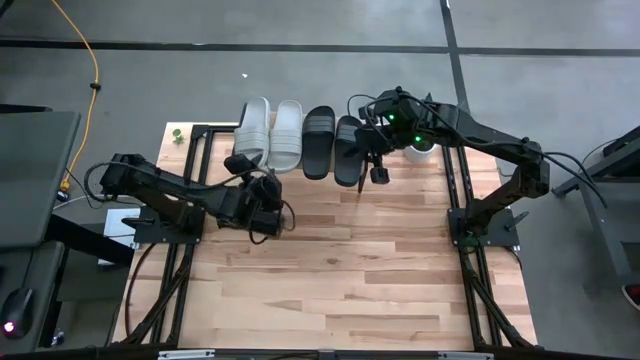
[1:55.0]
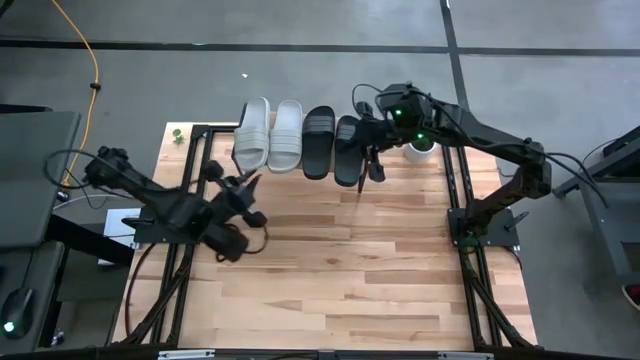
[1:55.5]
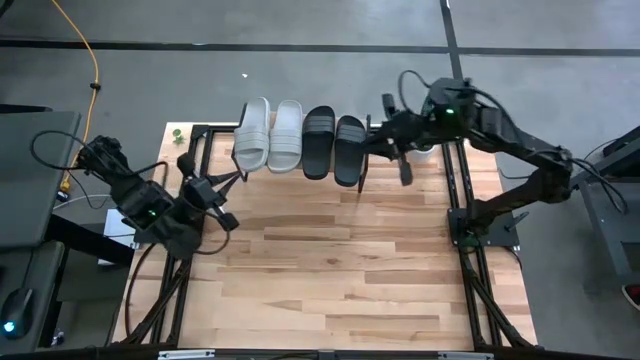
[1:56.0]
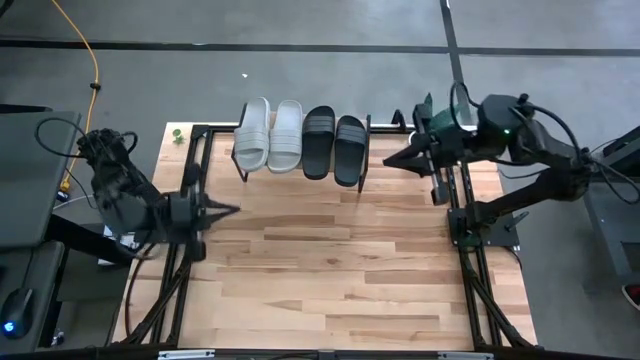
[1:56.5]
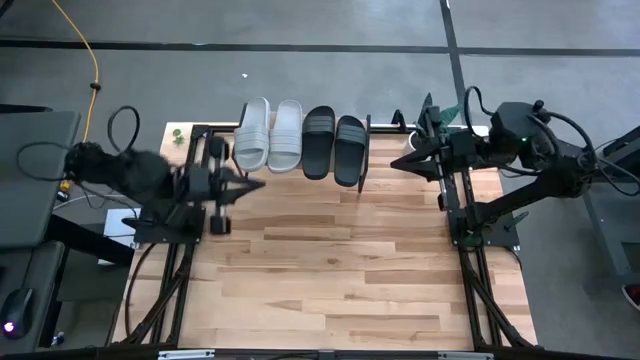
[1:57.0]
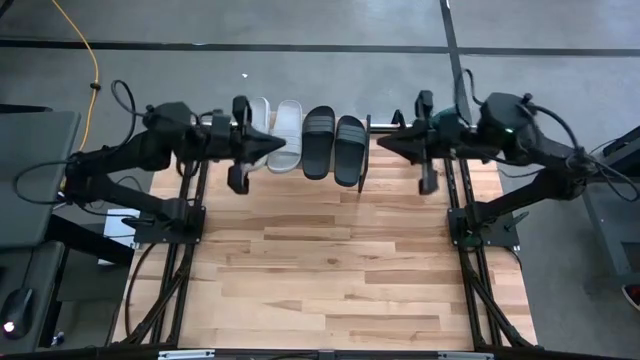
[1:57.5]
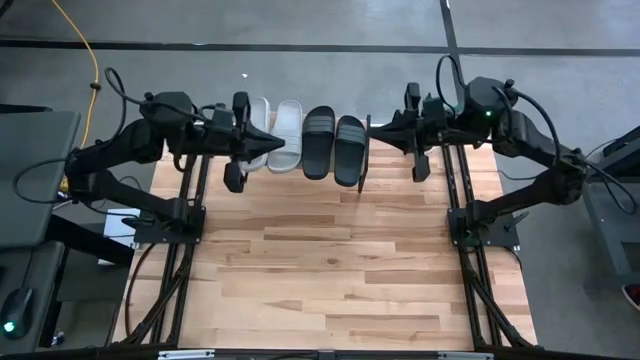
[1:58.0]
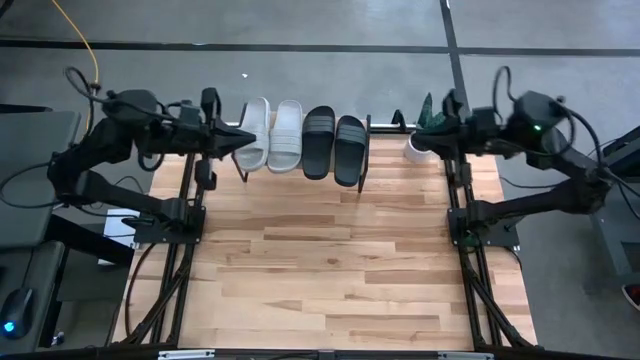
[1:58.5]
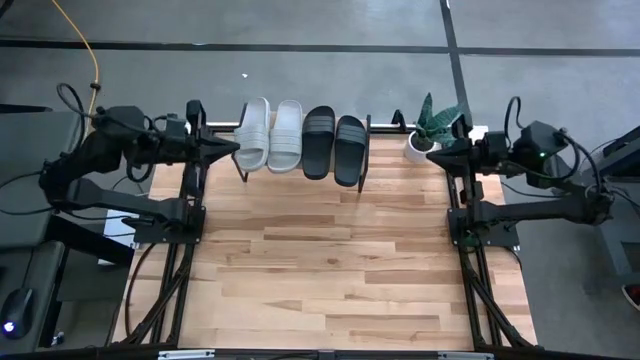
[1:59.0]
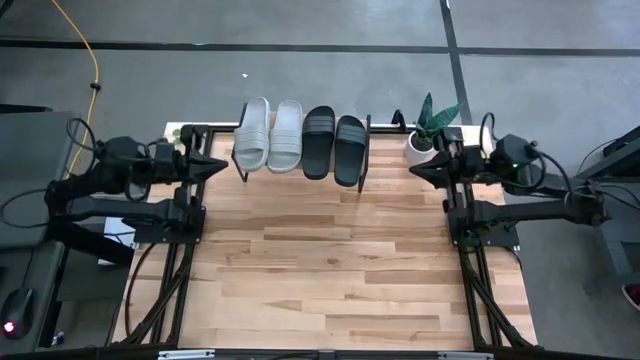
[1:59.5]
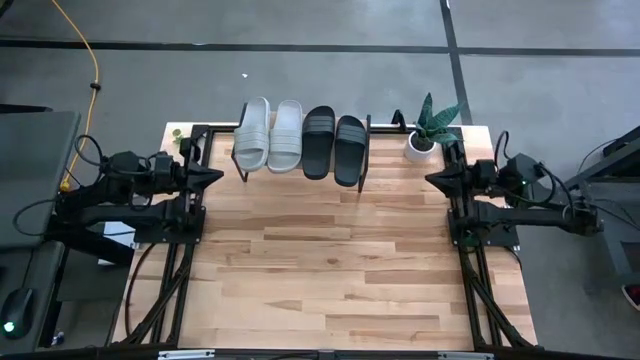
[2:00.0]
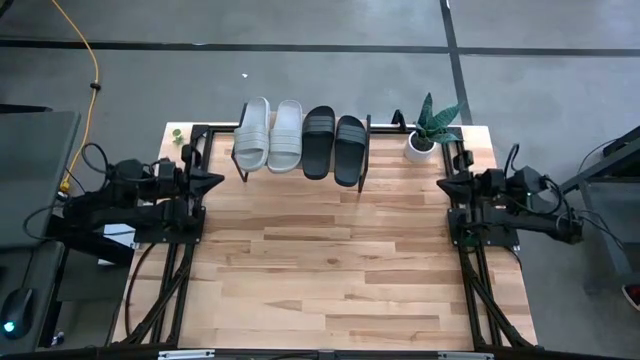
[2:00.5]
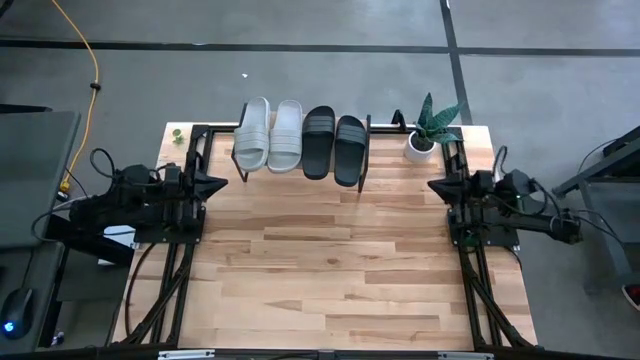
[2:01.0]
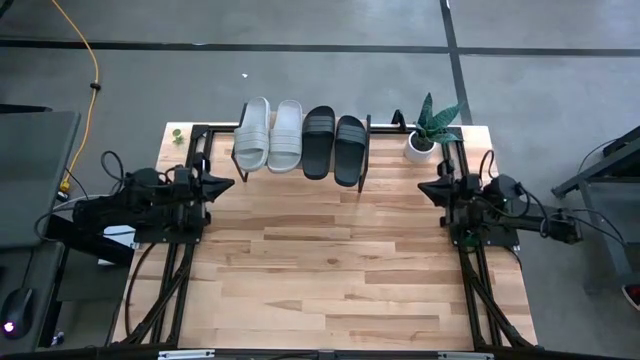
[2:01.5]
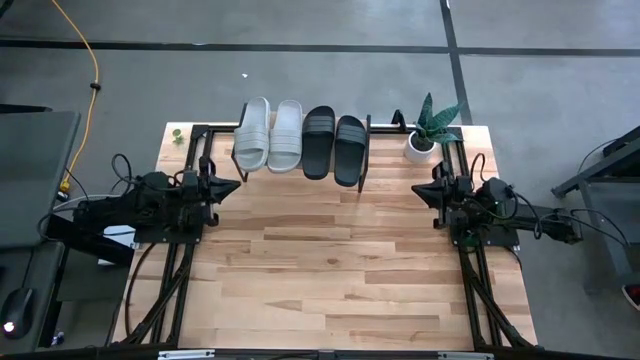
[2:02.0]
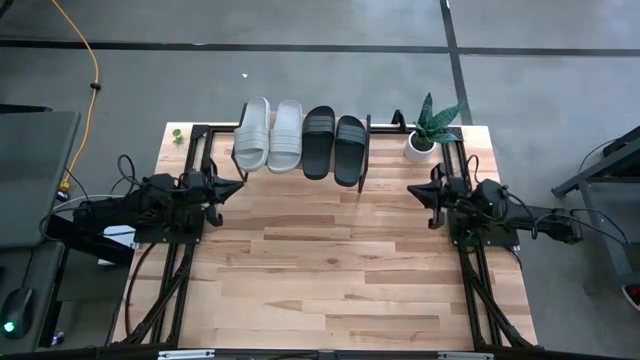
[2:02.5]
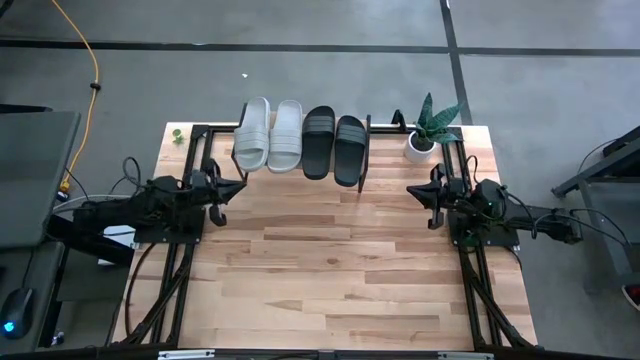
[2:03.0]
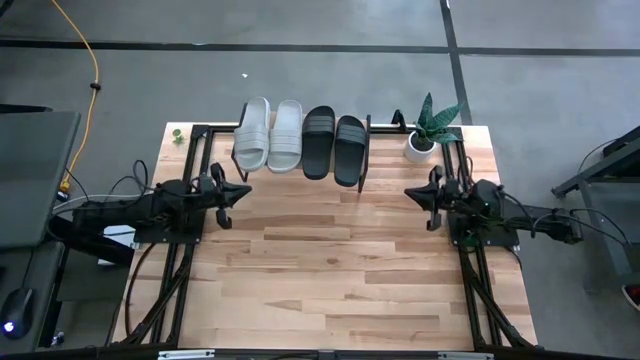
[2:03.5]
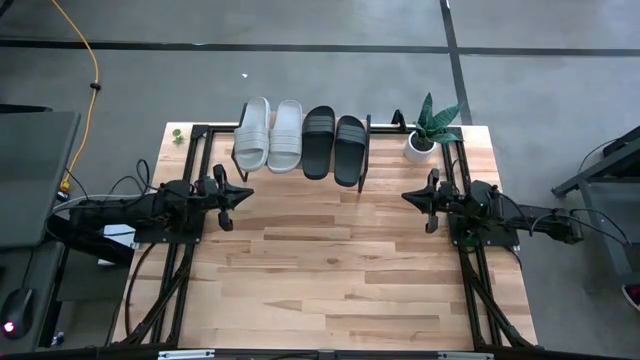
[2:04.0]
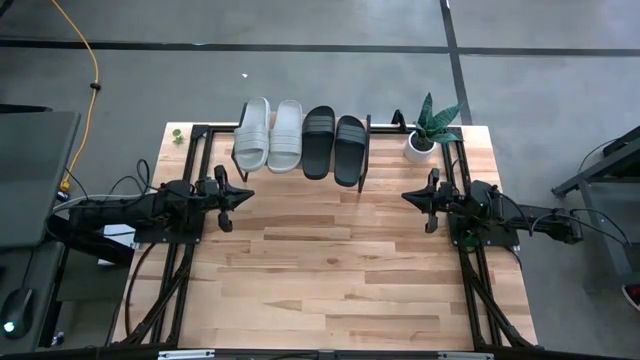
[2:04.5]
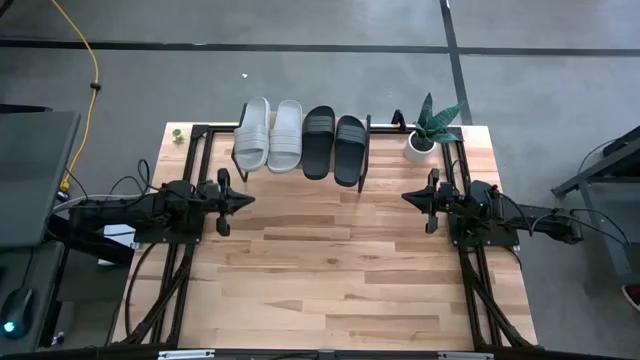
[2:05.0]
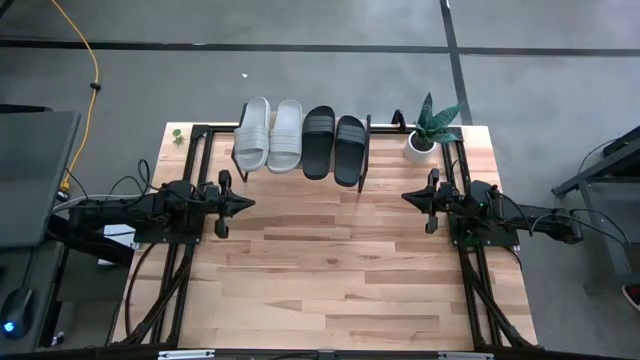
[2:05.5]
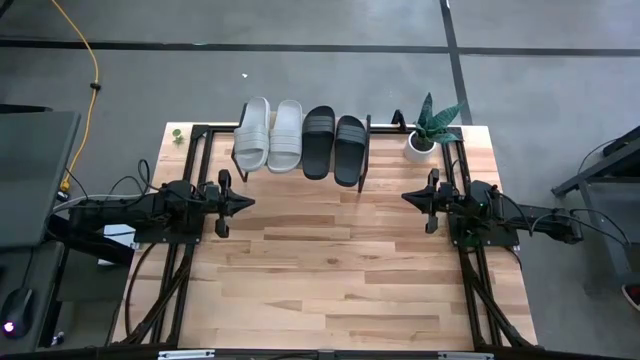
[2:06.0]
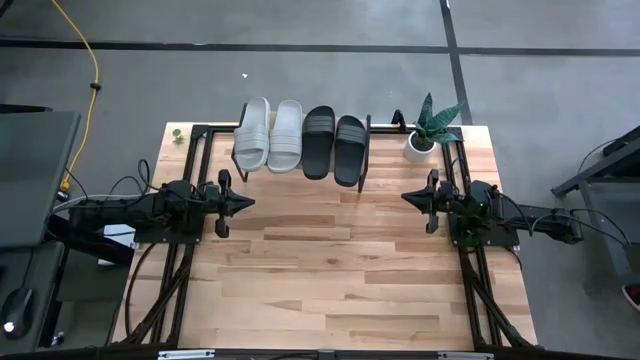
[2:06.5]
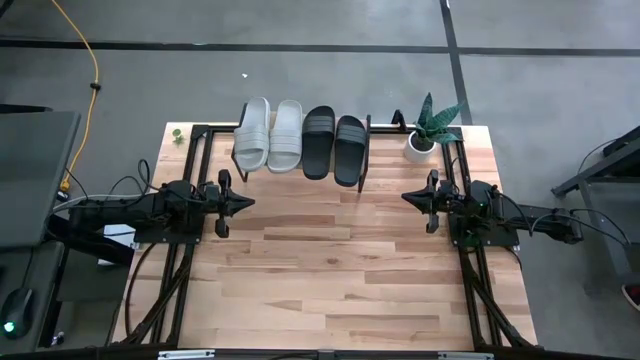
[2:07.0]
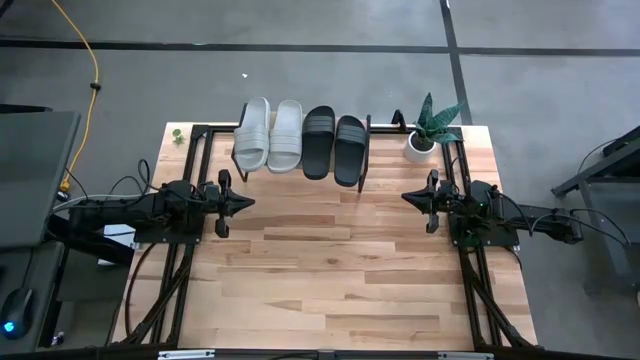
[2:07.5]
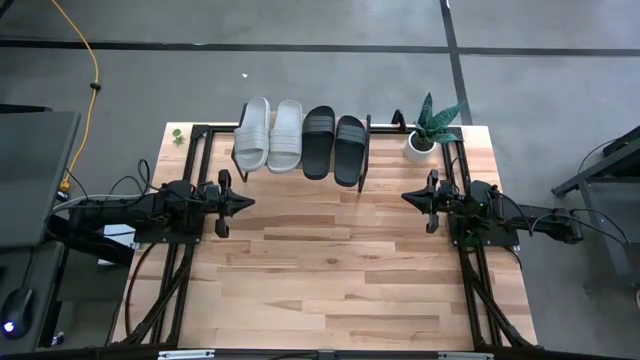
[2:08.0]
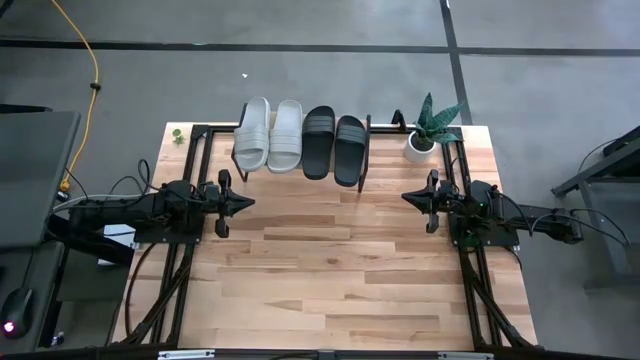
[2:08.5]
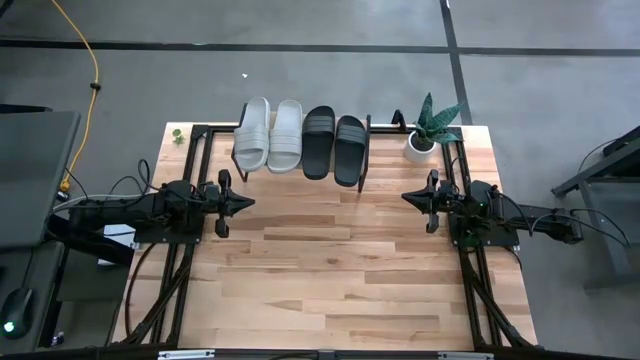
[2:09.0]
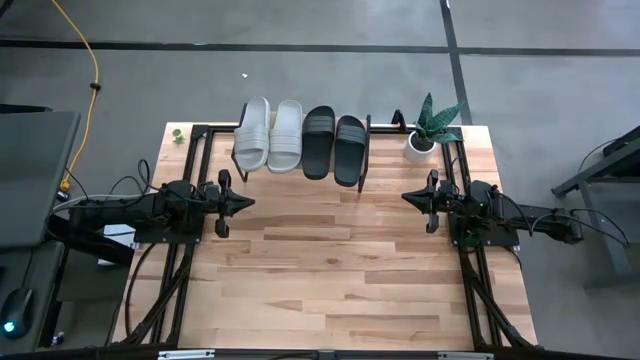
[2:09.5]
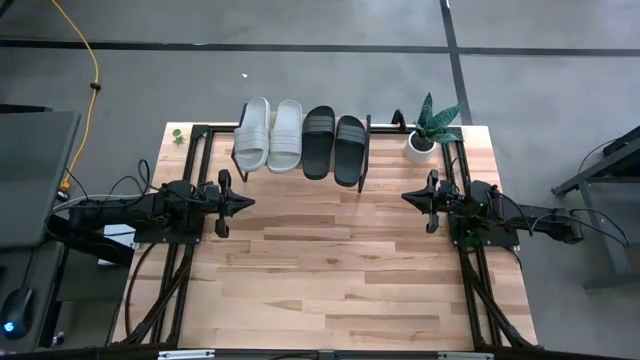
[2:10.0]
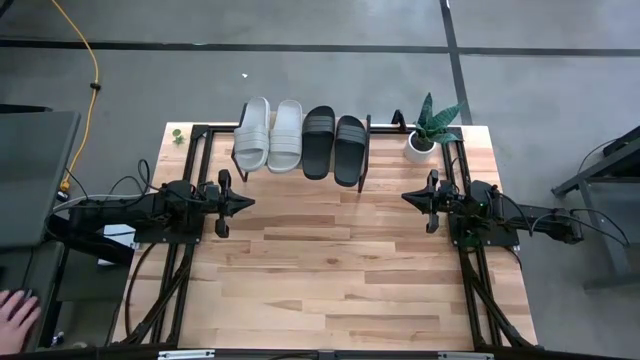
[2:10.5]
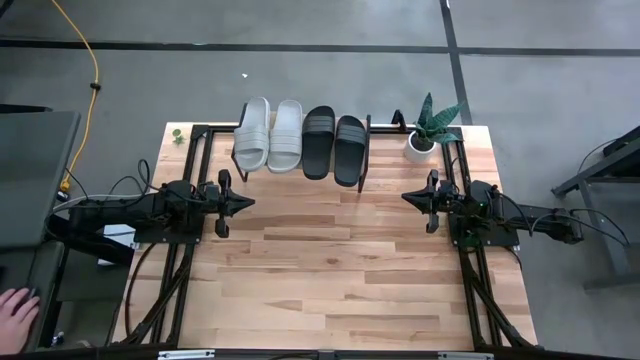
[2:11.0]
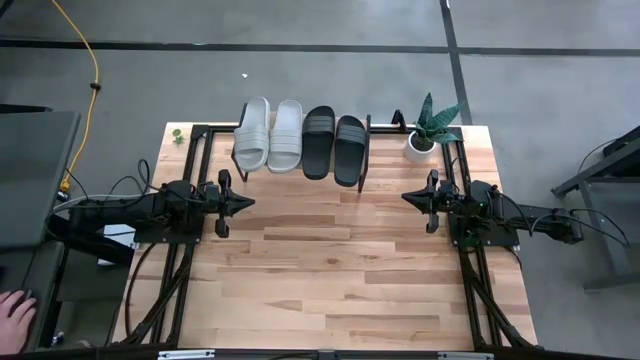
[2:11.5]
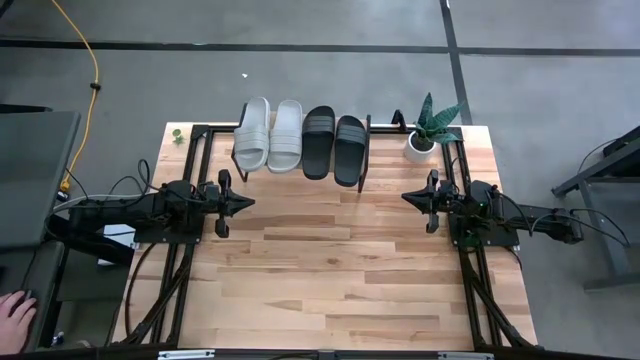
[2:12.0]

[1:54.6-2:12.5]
Task: Pick and place slides into the shelf
Return to Home Position

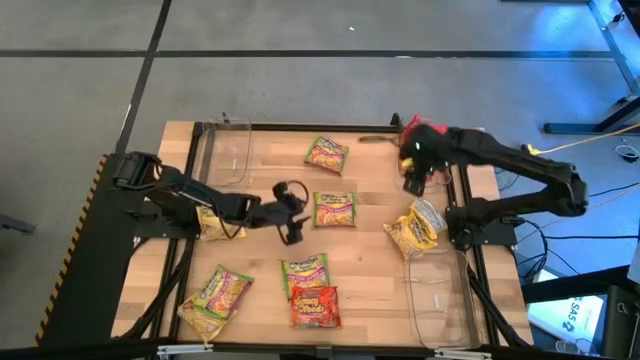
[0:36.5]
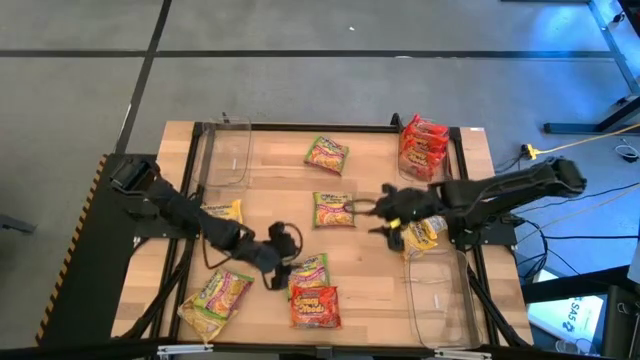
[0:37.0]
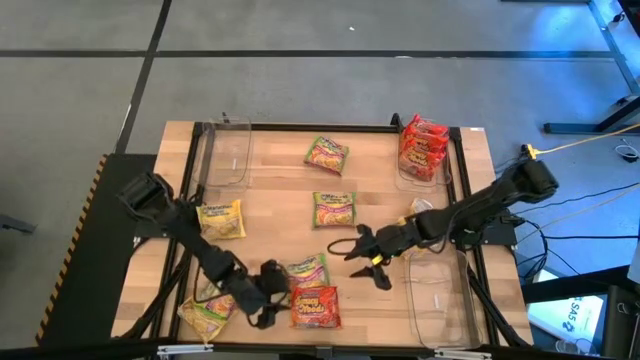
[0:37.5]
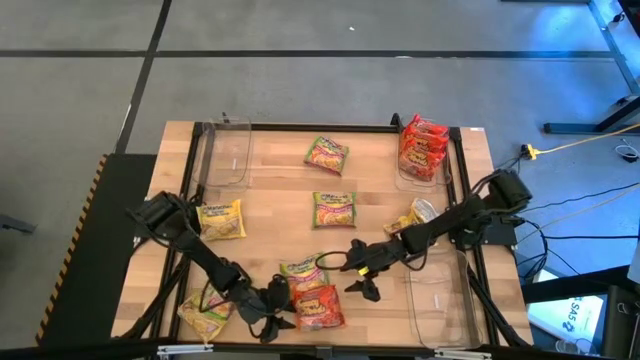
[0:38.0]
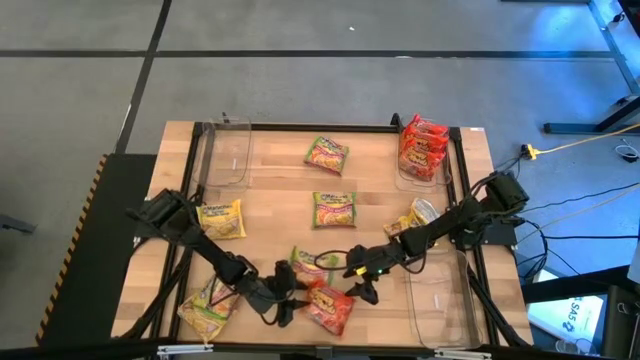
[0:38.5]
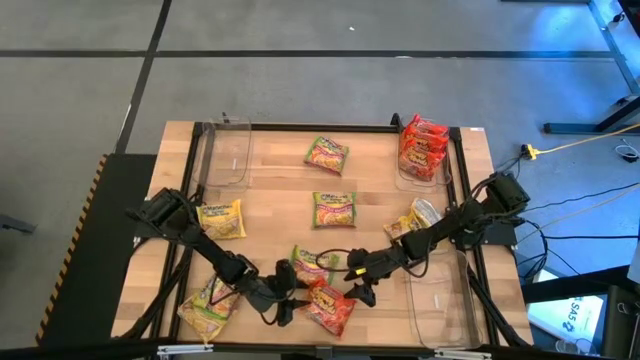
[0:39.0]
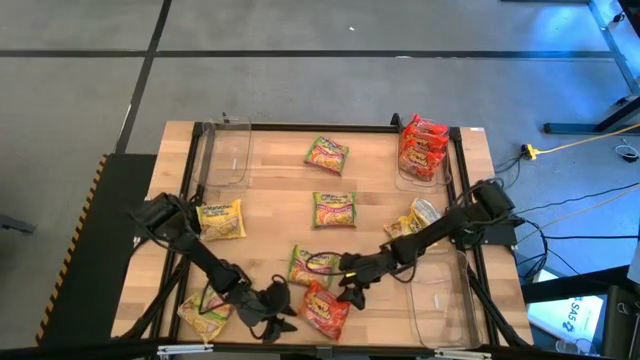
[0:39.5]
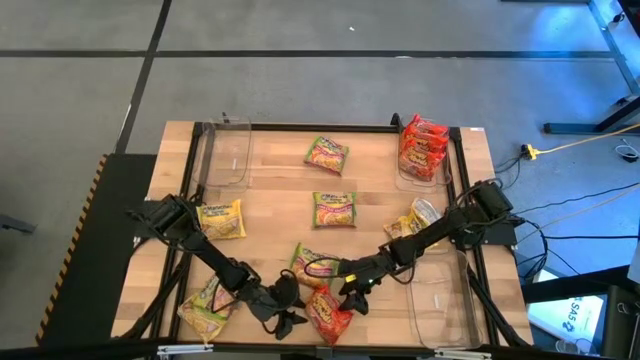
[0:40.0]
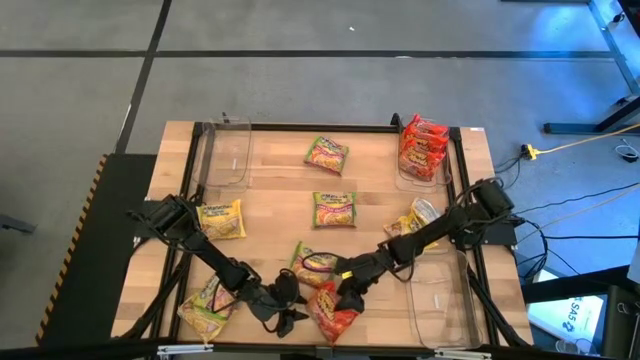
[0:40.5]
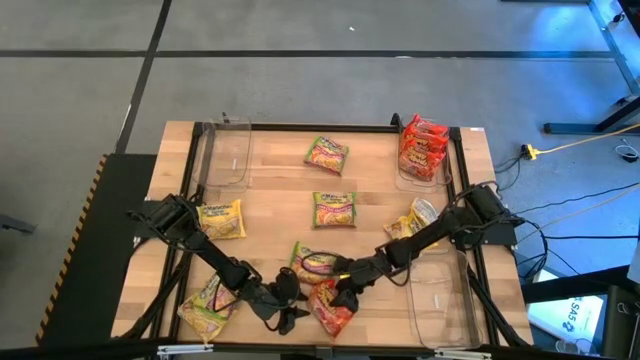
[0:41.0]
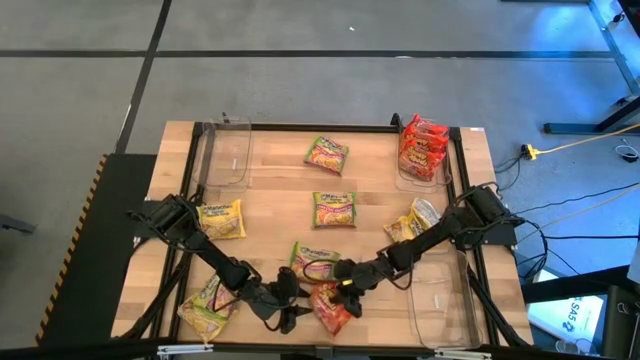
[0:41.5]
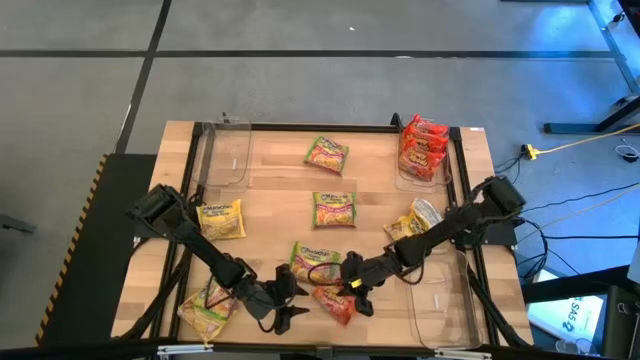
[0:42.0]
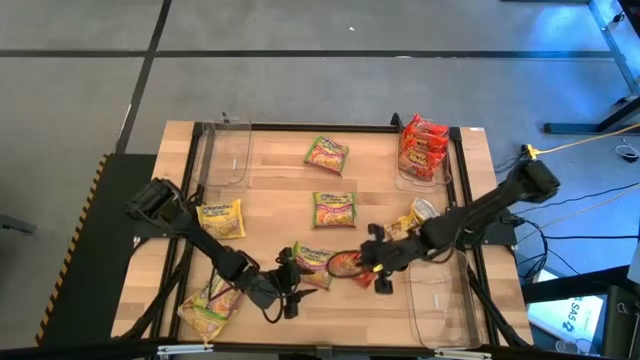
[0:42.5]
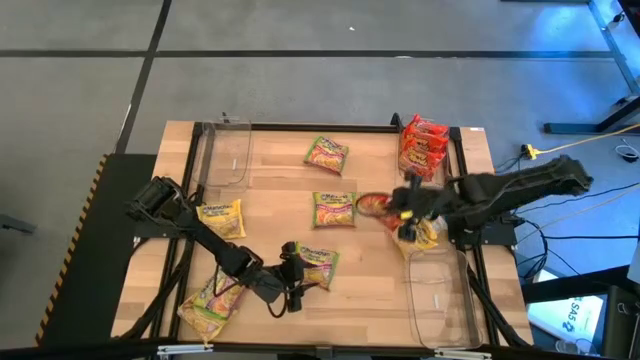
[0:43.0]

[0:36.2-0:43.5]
Task: Sort Maruchan noodles
Put the orange noodle pack into the top right transparent bin
